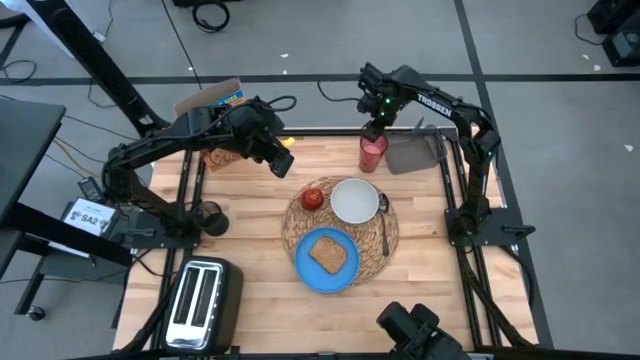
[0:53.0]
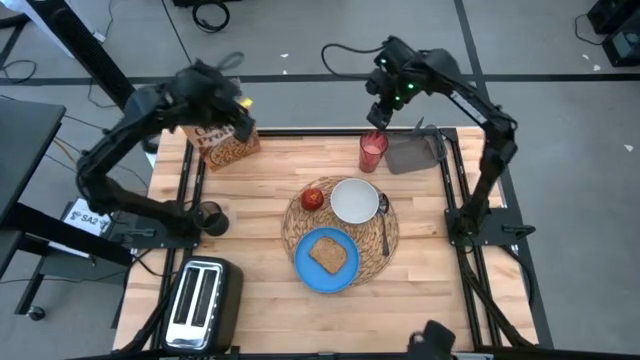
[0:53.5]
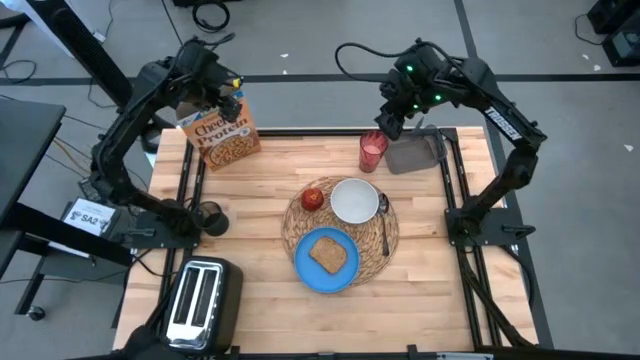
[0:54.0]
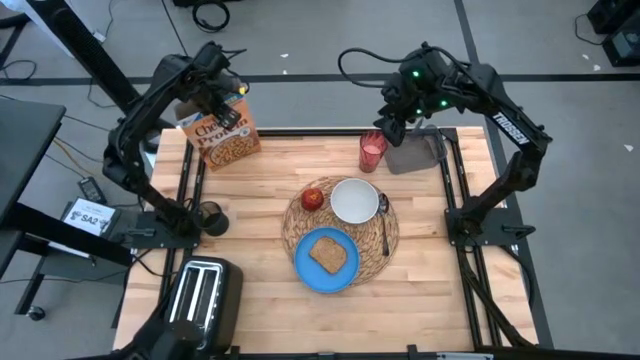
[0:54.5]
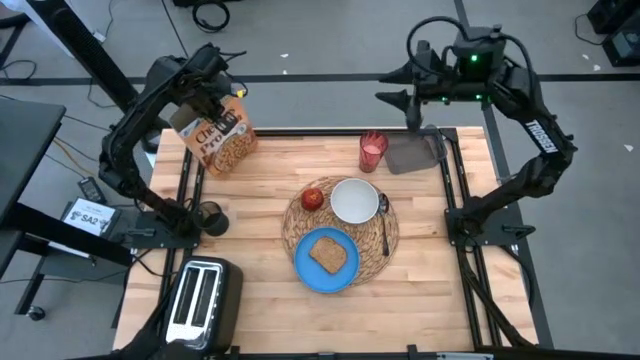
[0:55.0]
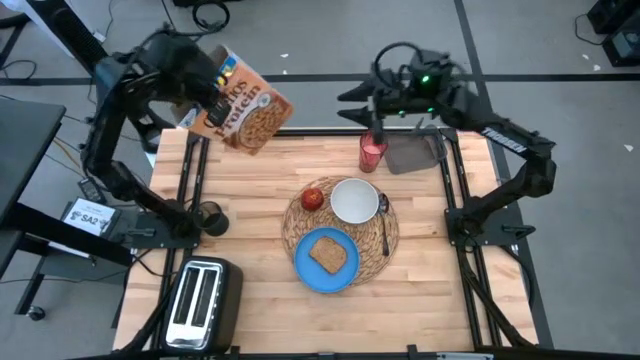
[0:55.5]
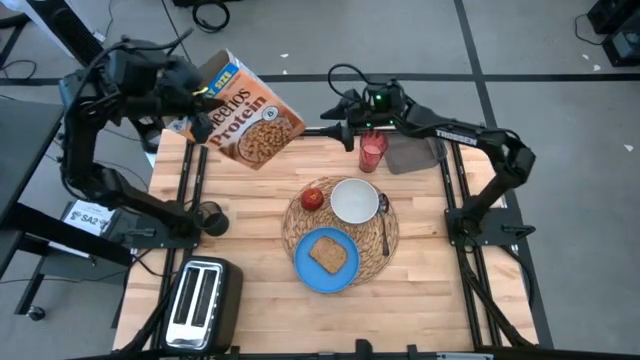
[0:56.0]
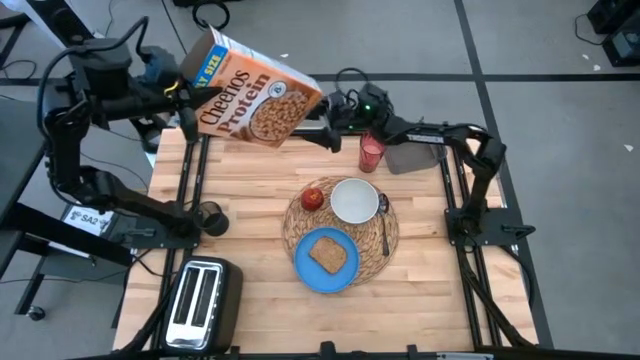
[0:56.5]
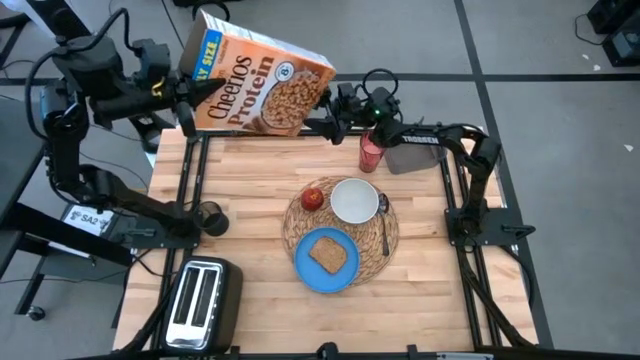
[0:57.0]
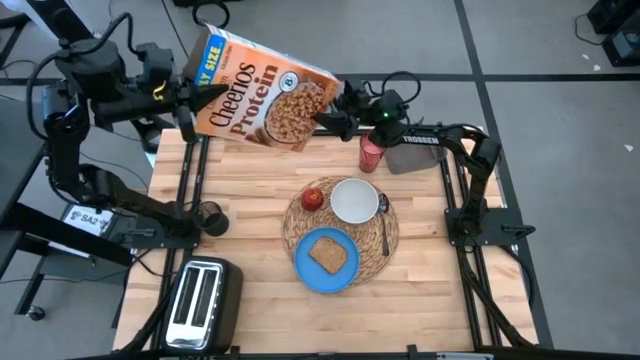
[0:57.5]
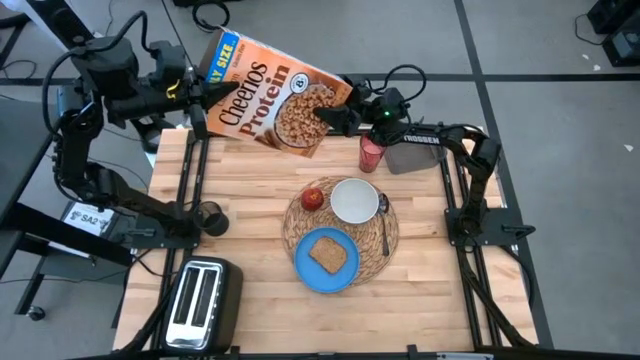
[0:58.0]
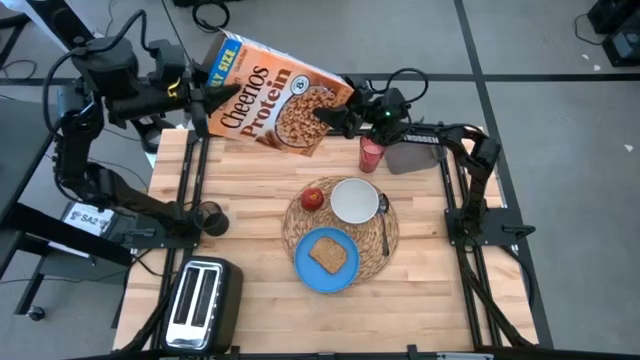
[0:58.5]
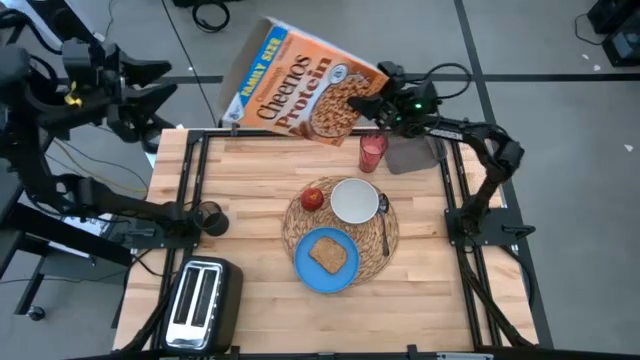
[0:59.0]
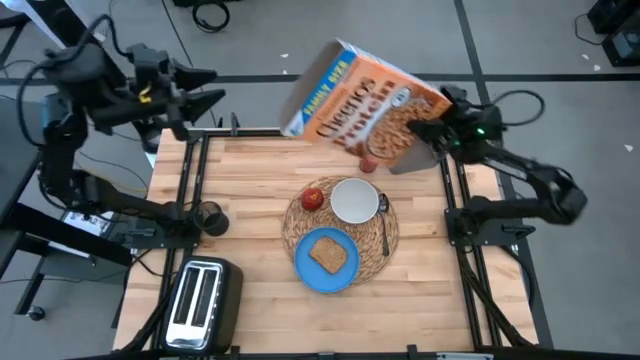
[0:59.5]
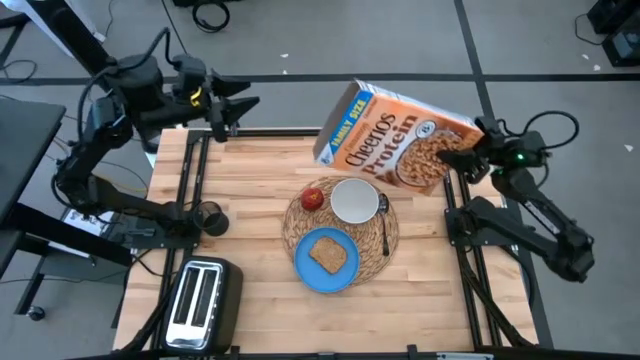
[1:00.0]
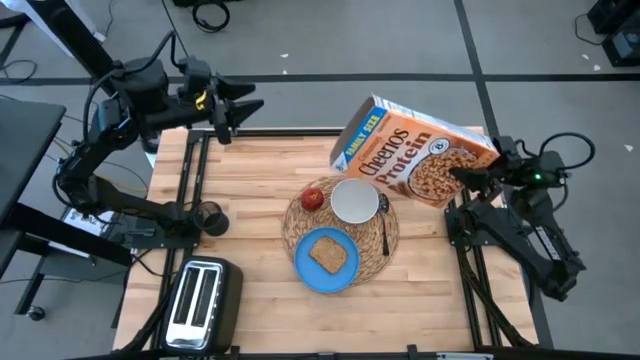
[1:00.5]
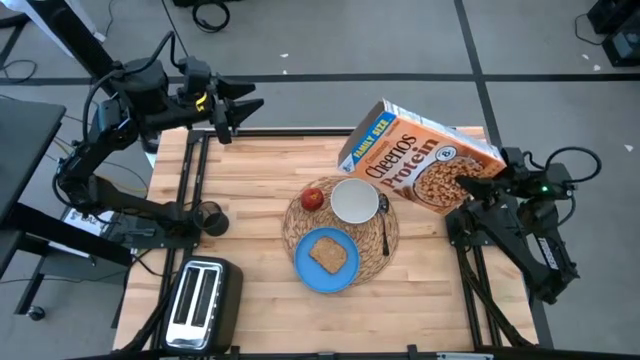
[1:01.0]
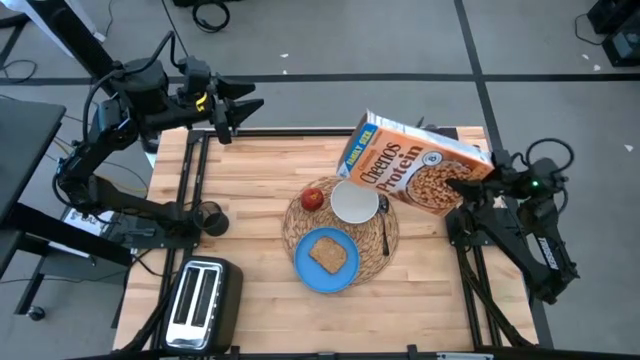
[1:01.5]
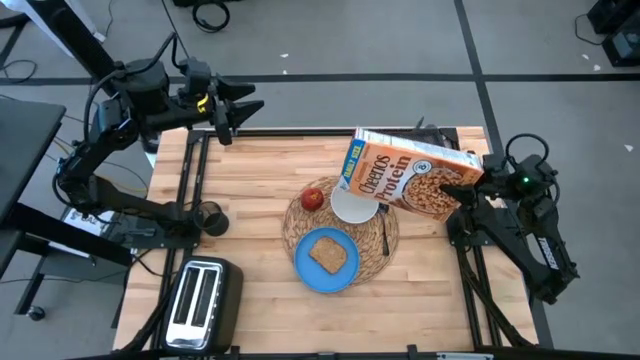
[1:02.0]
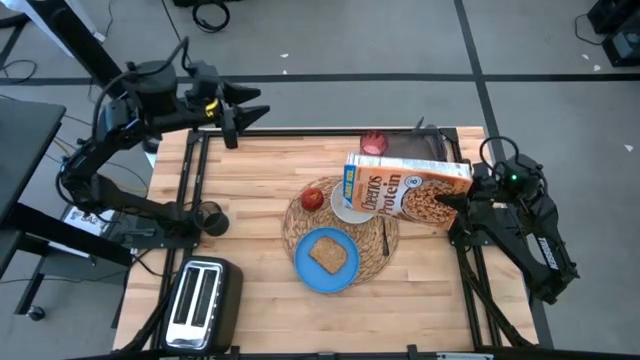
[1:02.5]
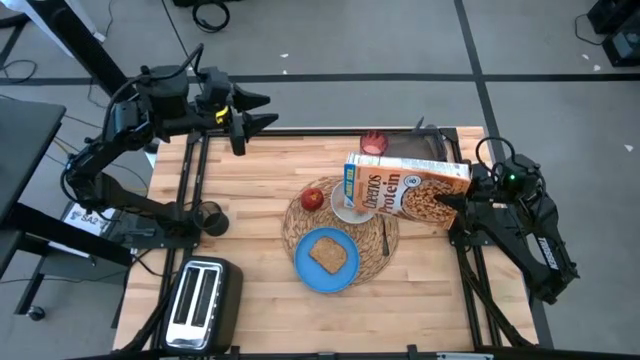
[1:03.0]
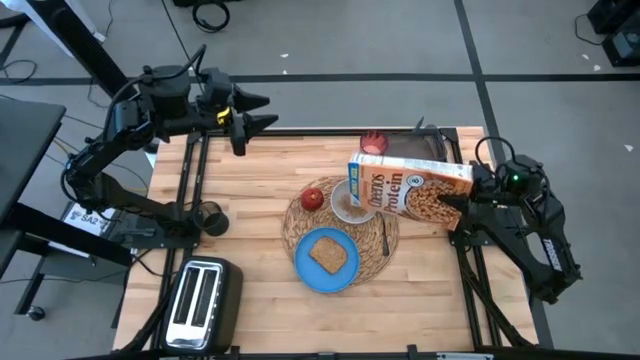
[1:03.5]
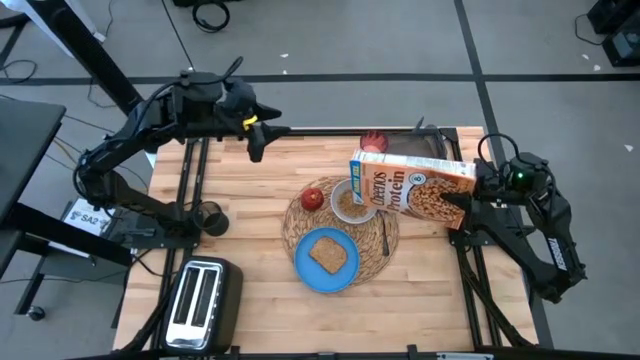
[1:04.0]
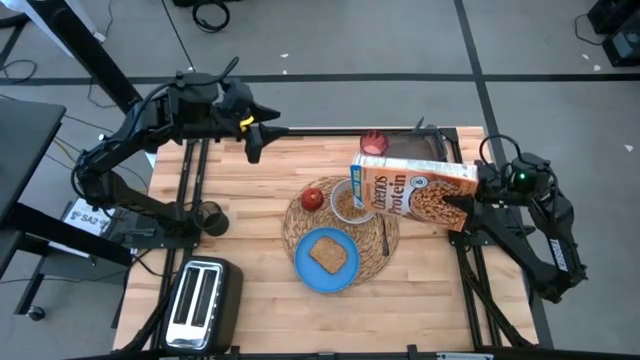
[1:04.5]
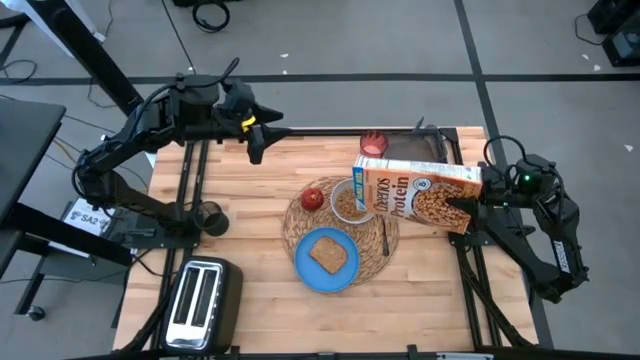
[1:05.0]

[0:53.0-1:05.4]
Task: Arrange a breakfast setting
Pour the cereals from the cereal box into the white bowl

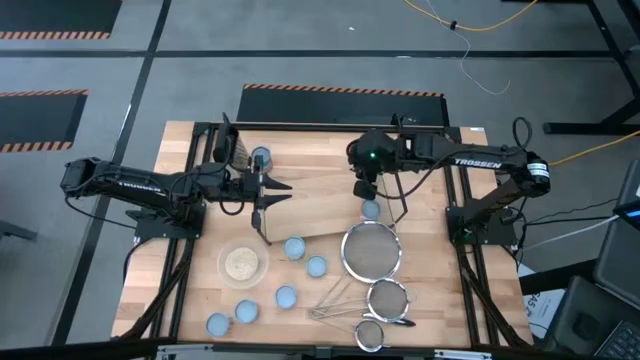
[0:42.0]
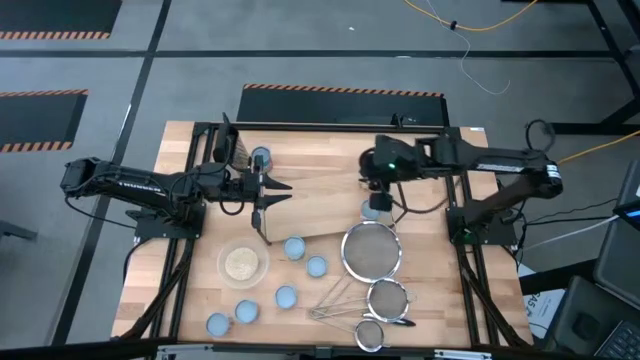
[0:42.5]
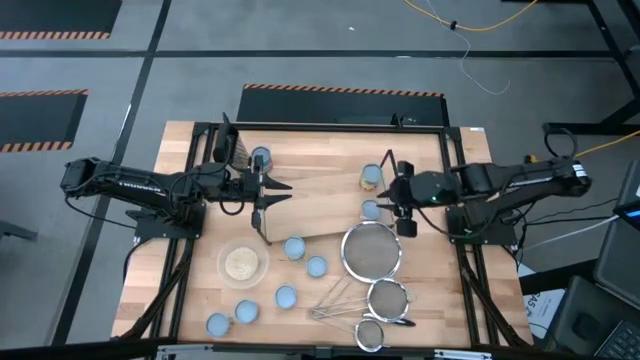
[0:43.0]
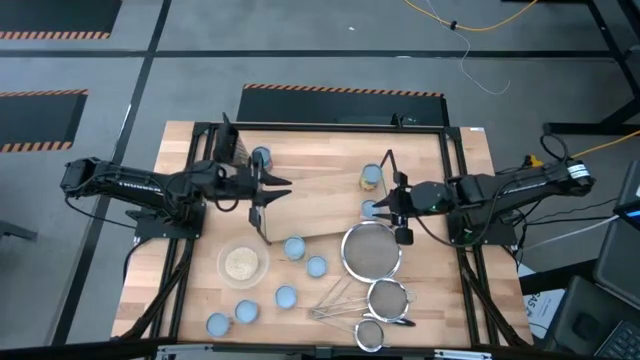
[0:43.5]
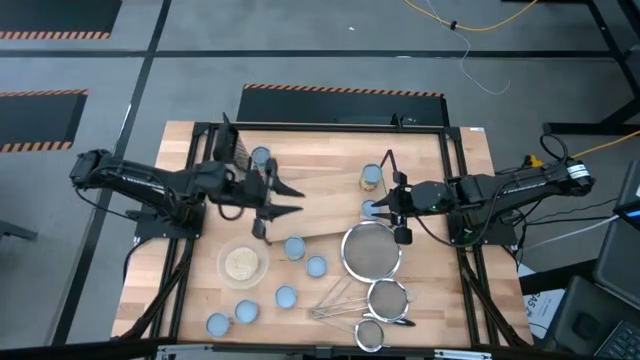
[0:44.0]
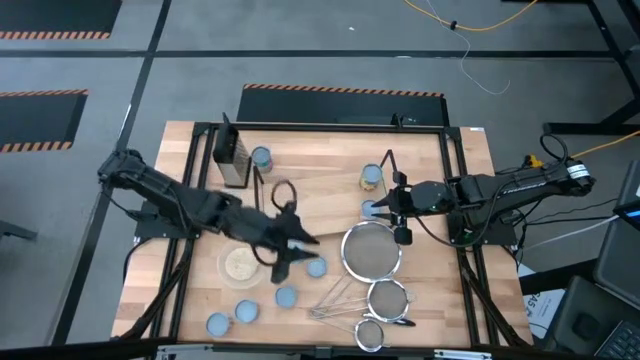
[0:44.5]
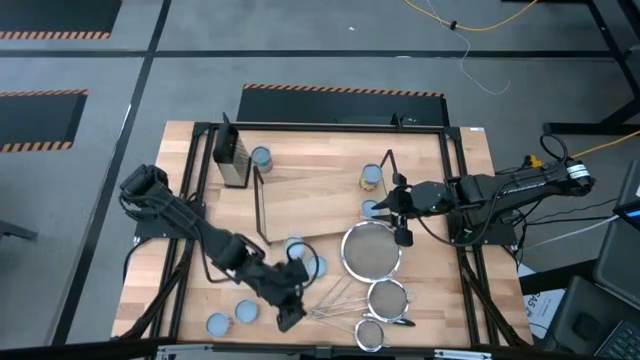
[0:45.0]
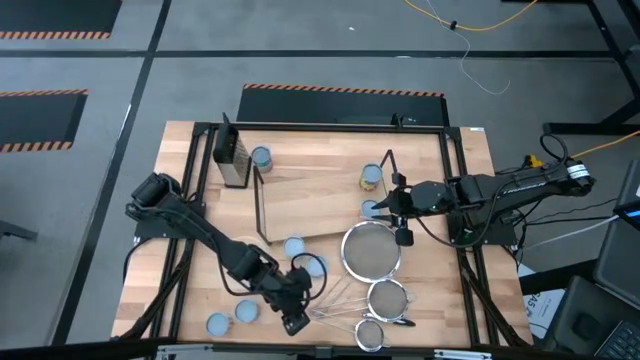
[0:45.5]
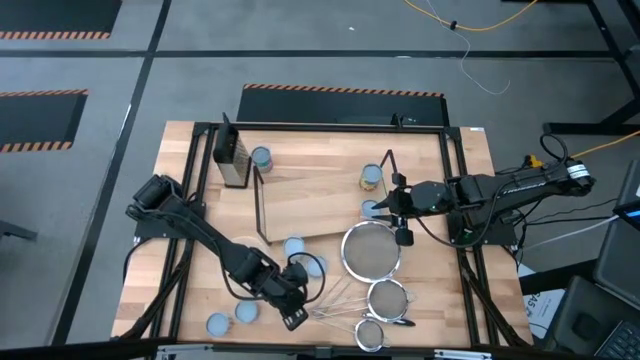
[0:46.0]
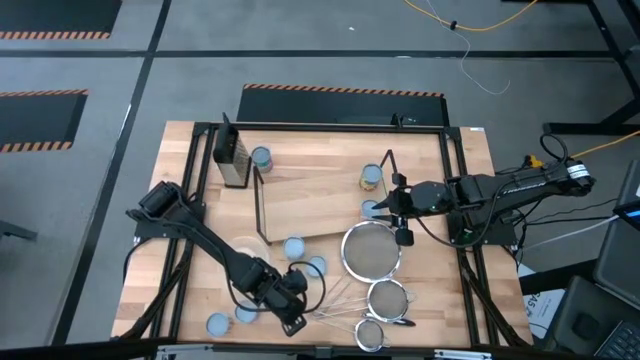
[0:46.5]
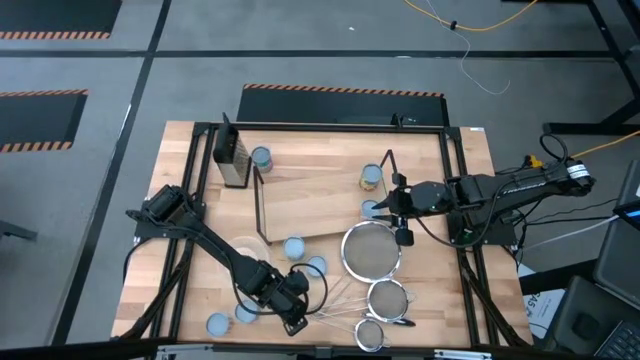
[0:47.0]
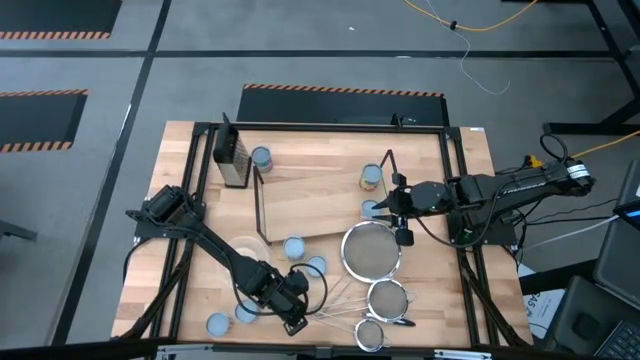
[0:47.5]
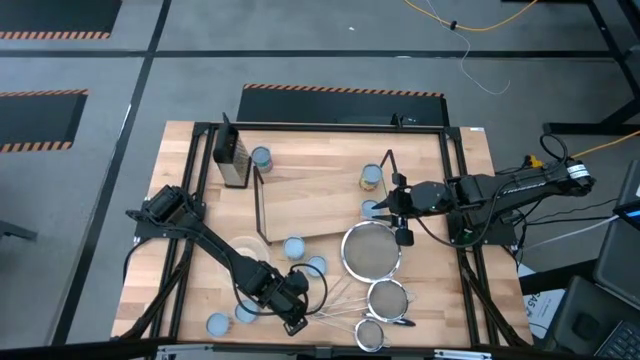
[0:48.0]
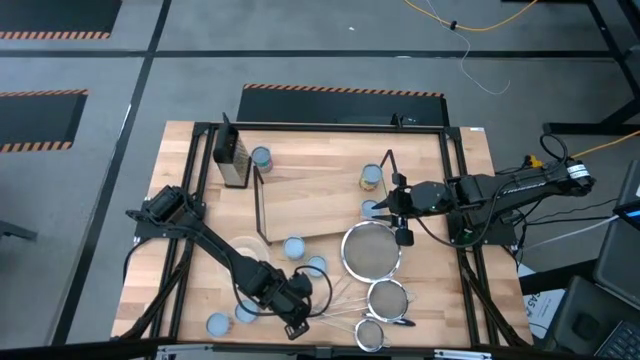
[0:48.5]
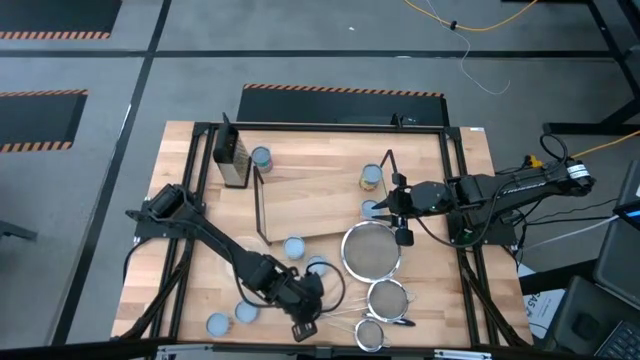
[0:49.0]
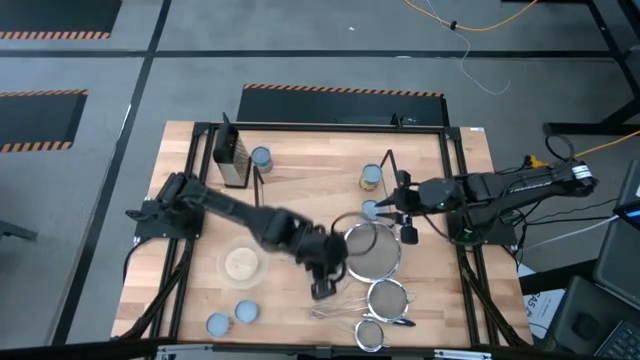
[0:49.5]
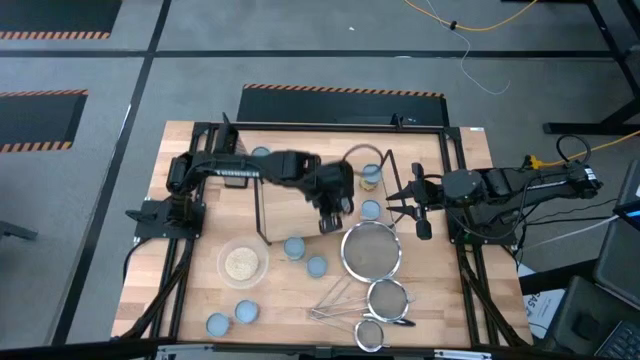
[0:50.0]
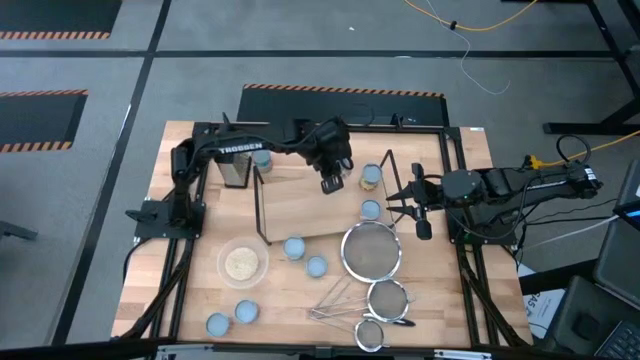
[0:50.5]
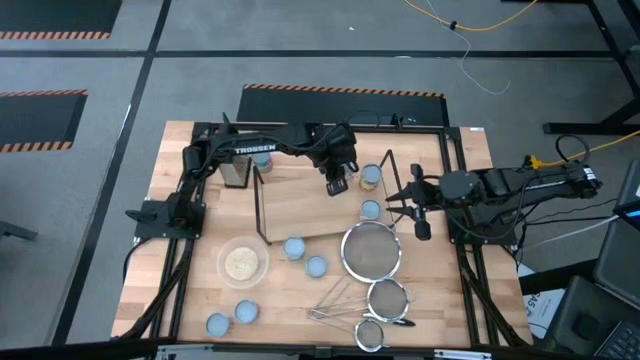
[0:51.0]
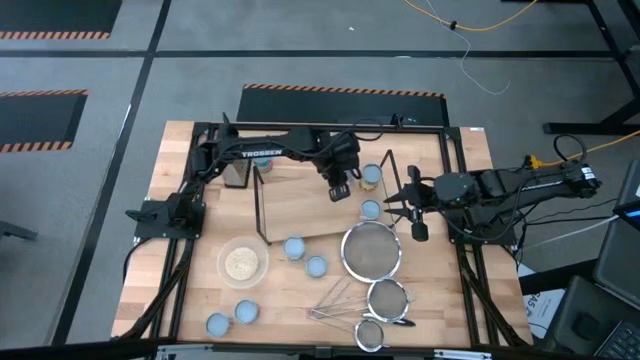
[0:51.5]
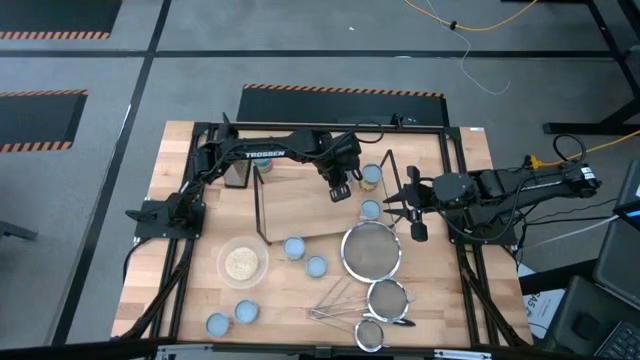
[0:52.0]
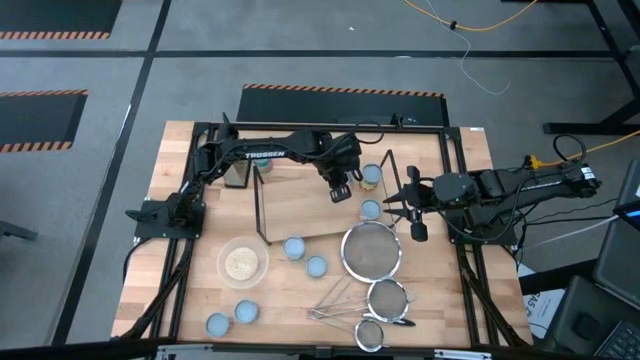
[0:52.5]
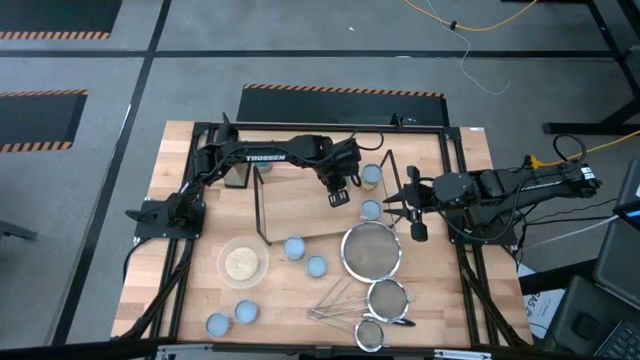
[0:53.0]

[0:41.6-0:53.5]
Task: Pick and place cans onto a shelf
Put the small red can on the shelf
